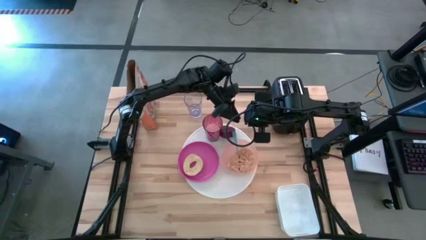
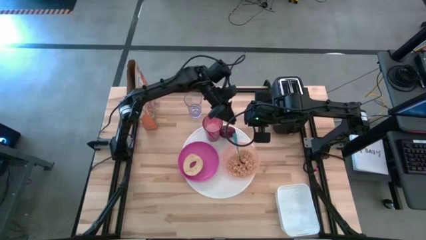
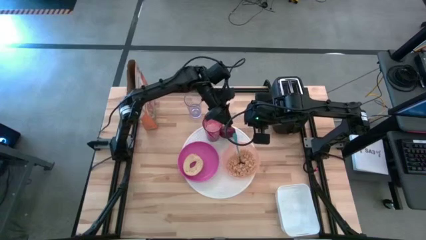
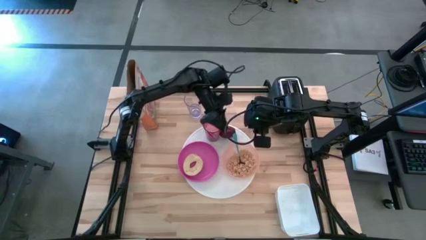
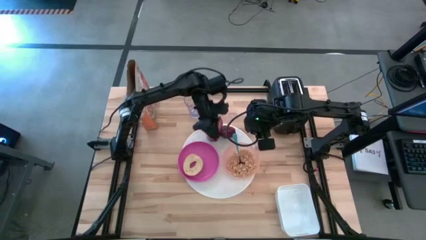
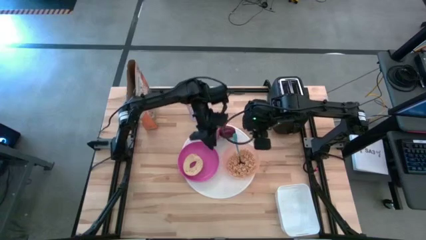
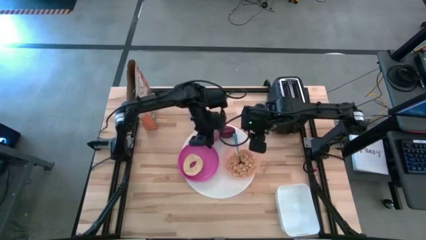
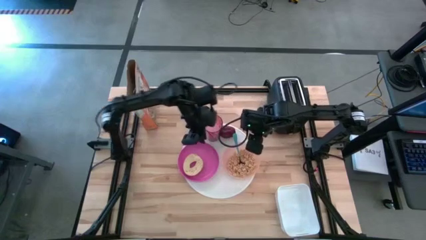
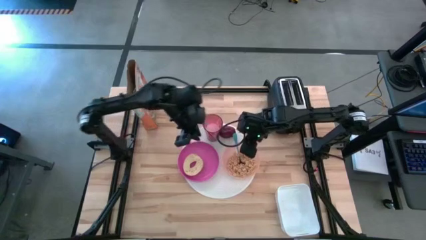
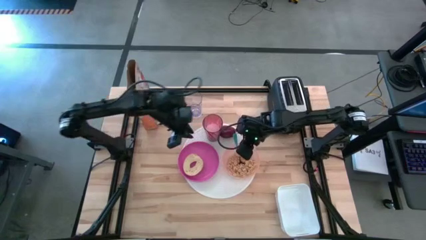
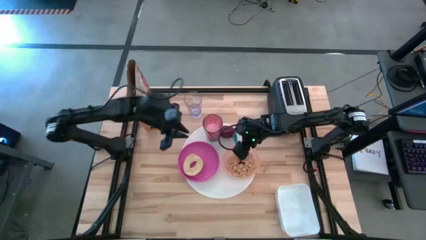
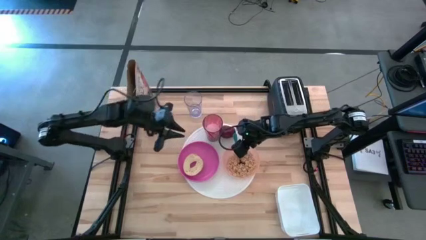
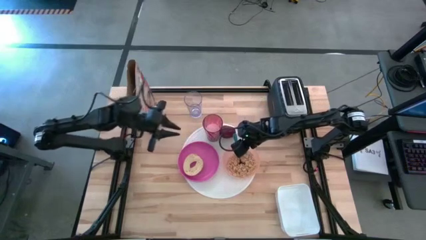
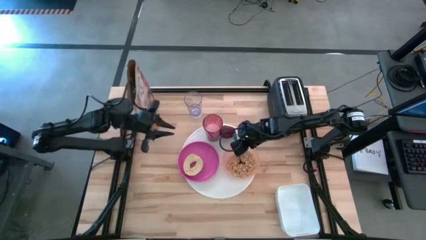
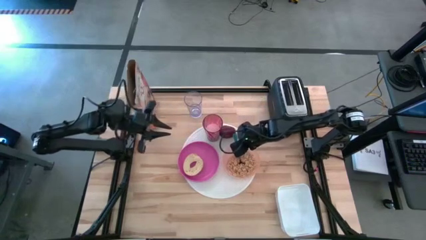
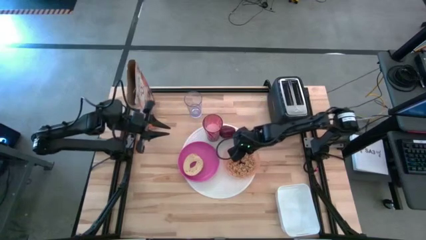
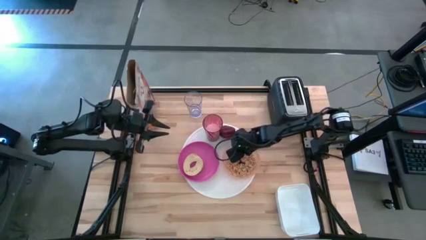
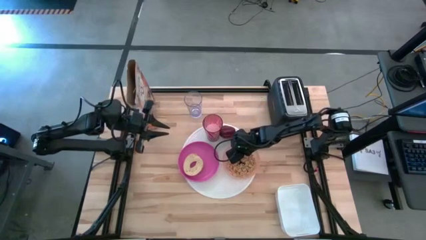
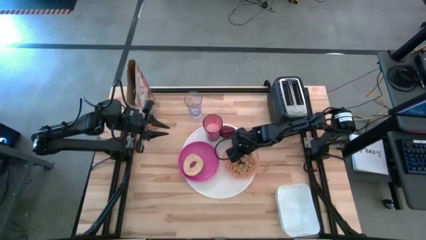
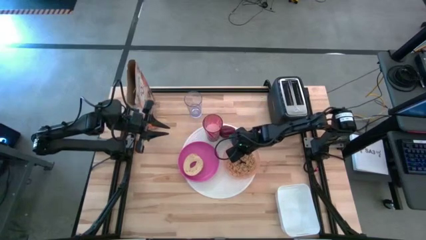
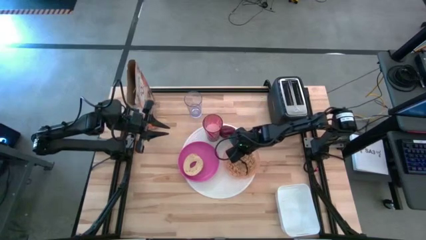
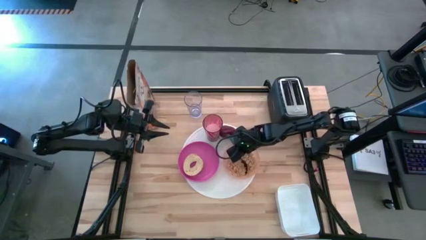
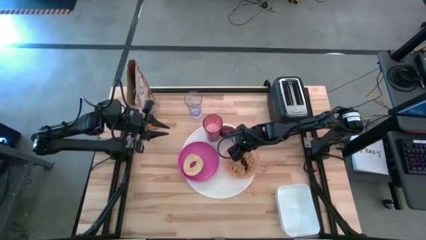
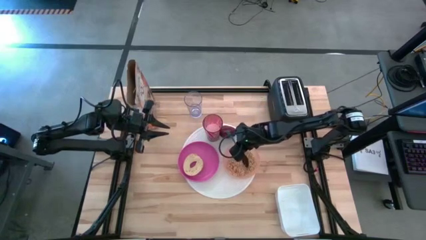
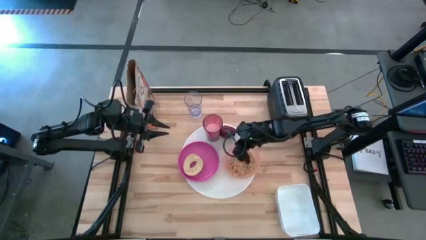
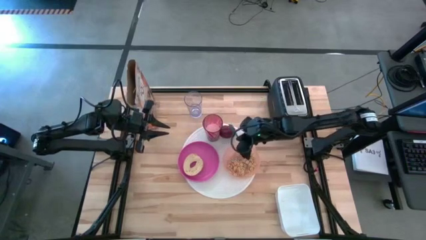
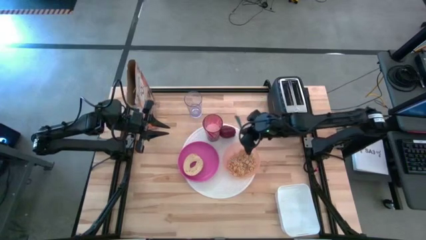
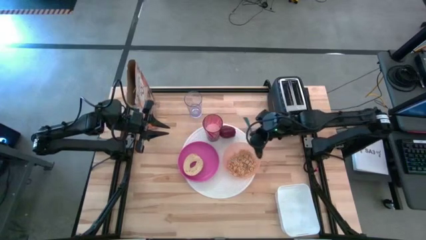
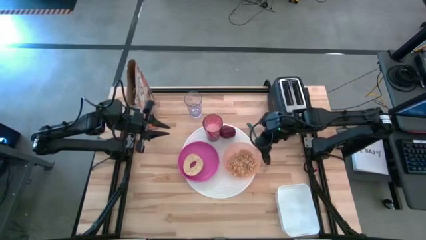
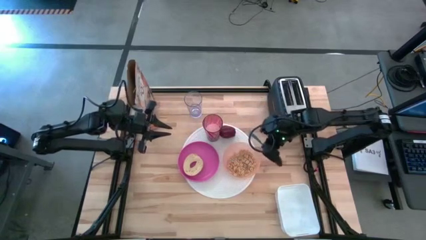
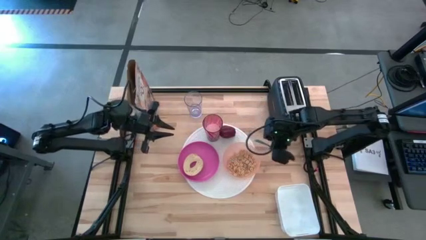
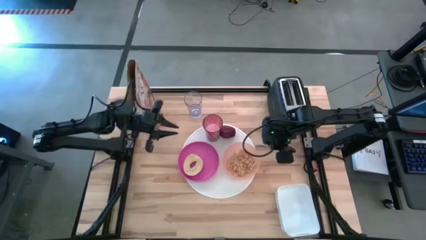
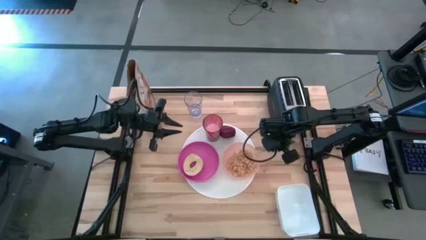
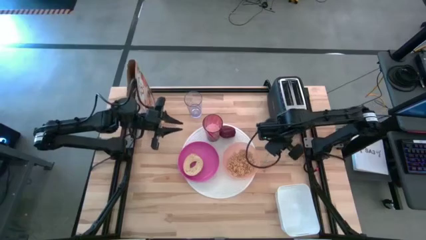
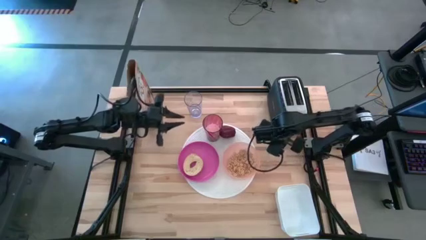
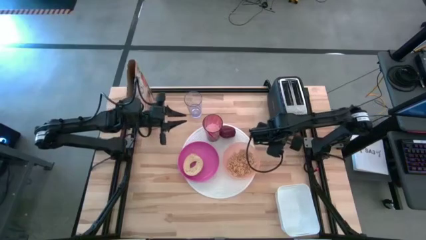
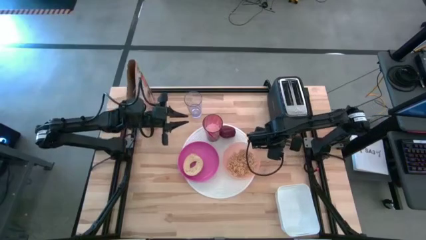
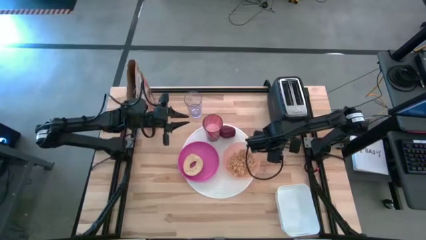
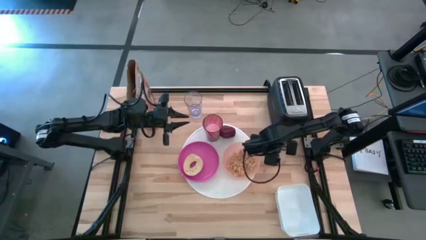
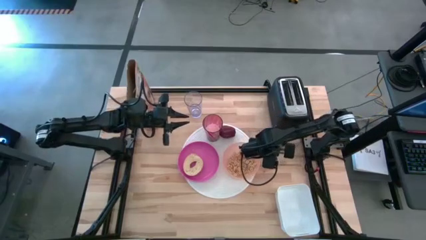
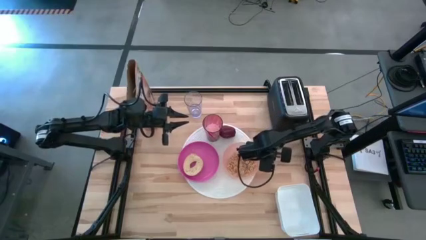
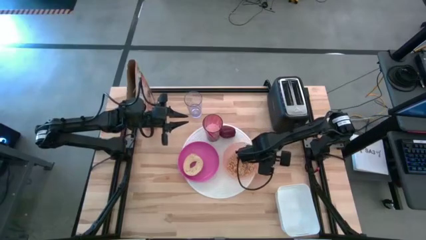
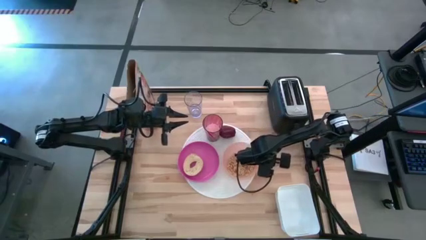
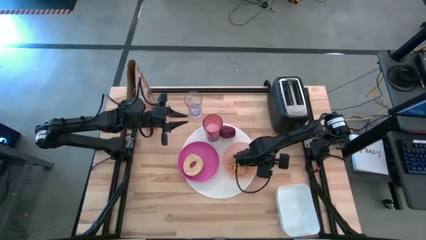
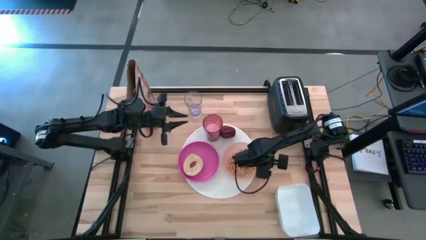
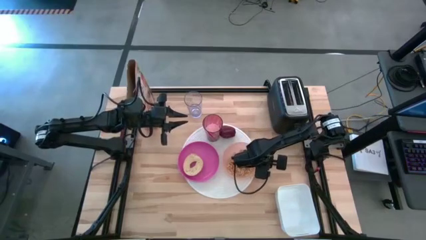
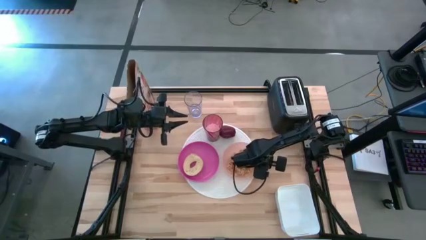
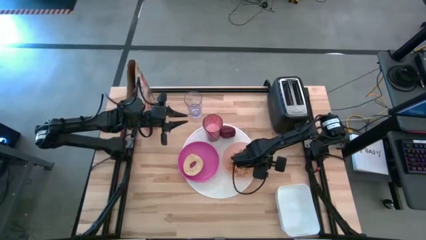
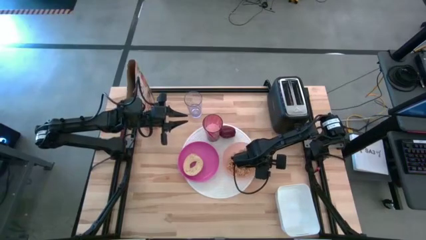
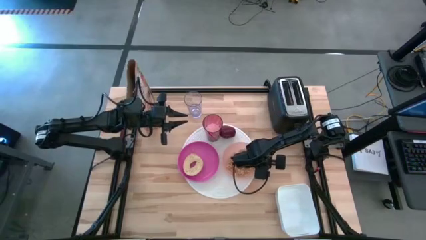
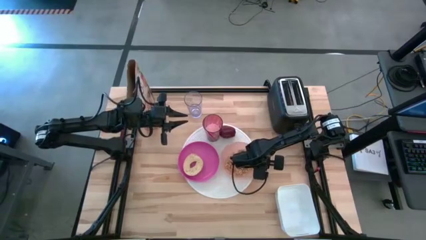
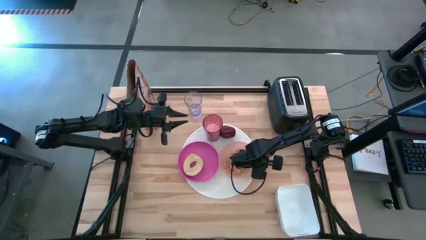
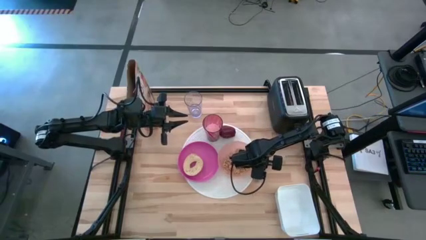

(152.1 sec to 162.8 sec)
Task: Arrange a breakfast setting
Put the blue spoon beside the orange bowl

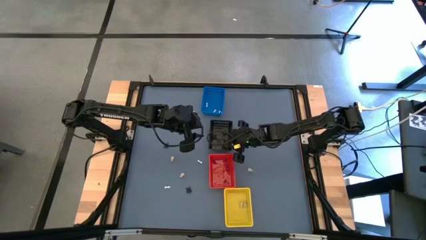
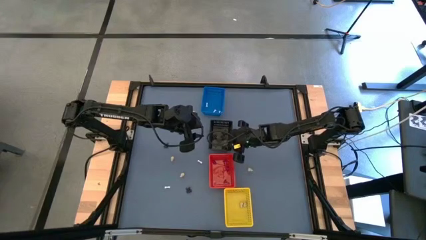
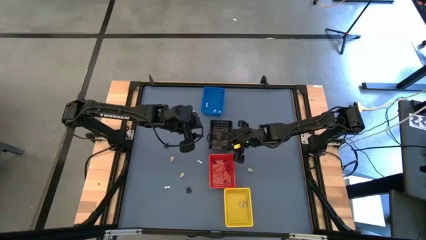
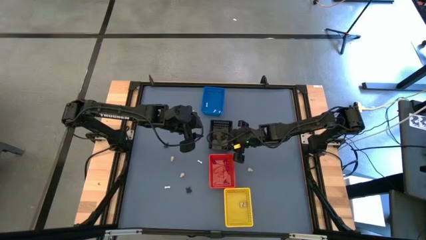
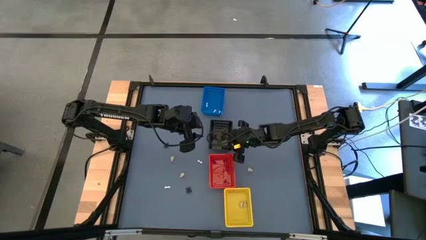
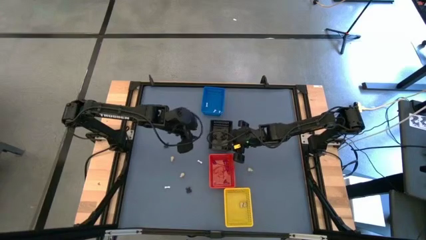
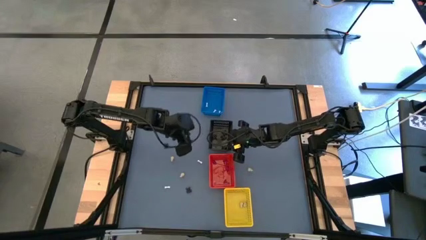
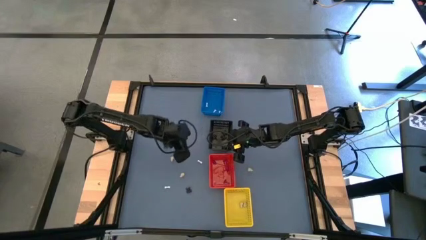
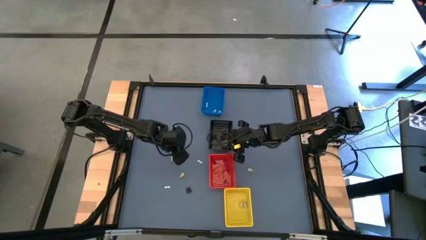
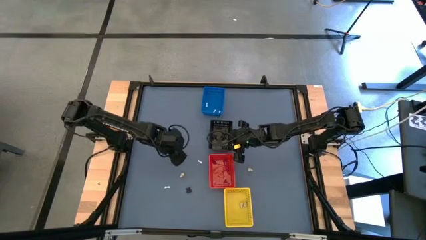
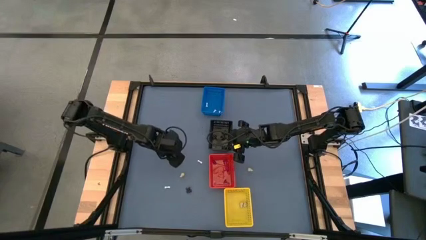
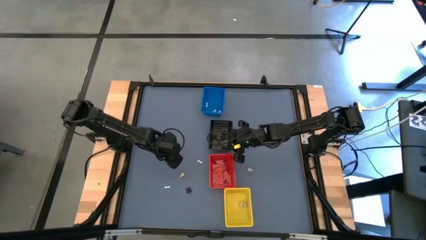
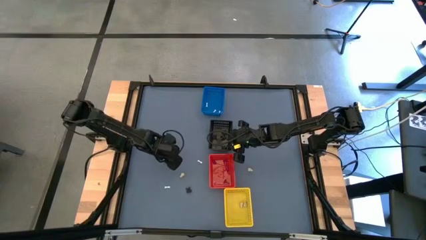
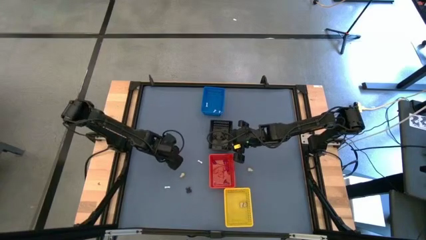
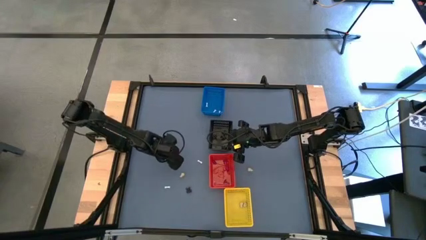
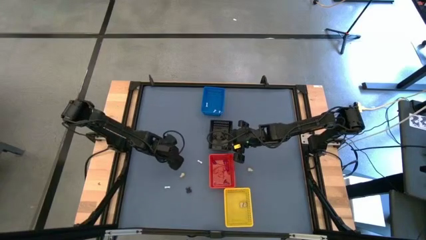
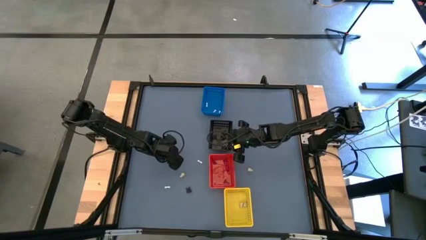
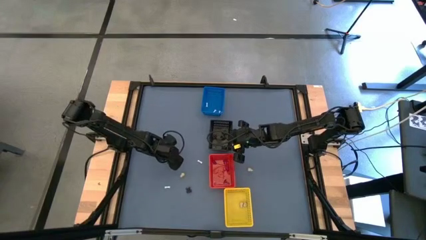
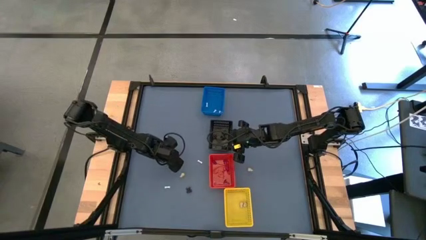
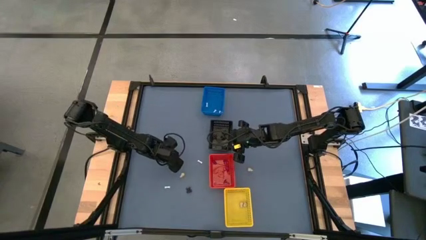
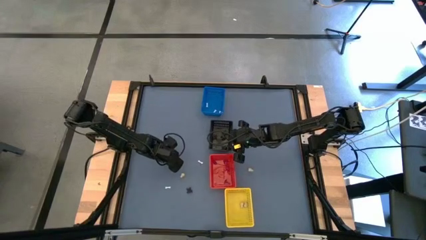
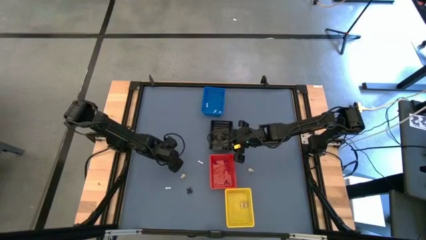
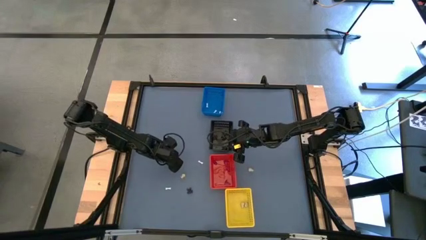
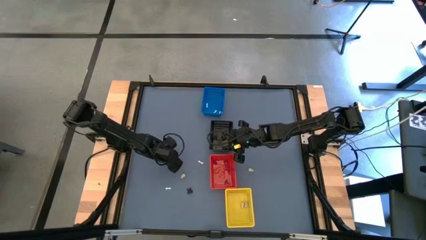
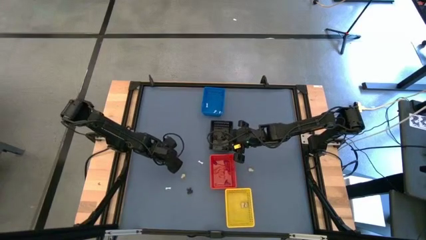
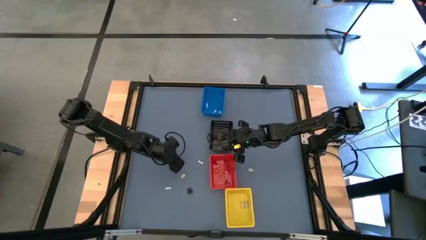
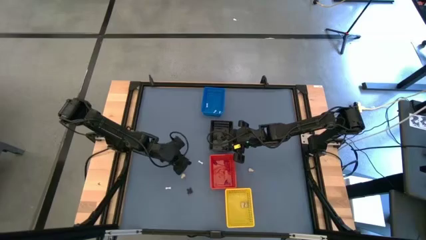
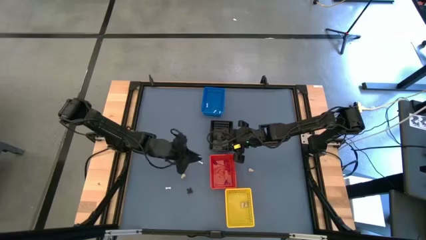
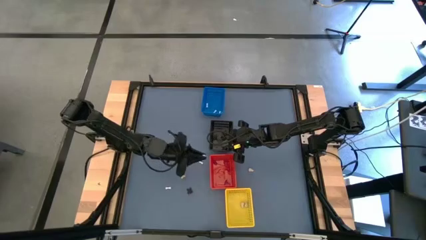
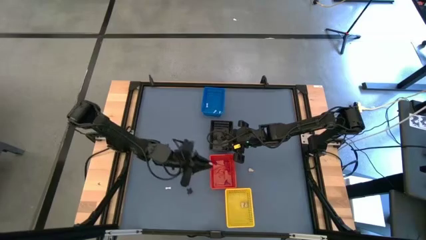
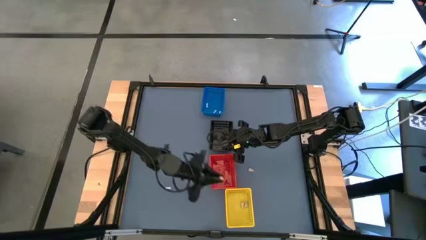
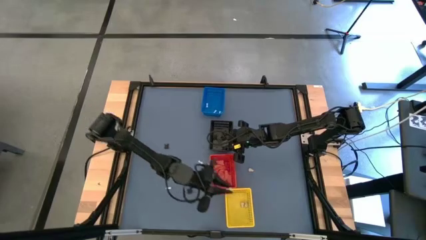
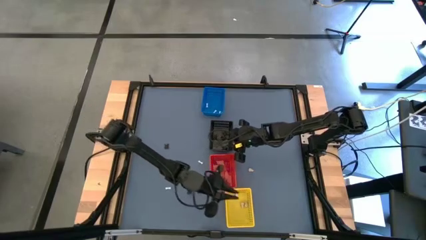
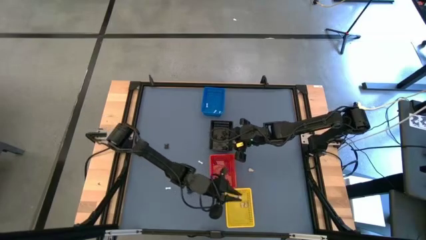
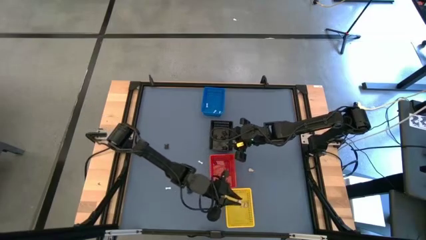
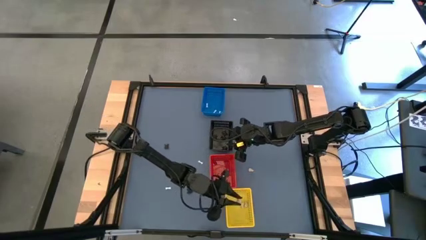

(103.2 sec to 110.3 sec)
Task: Sort Halloween decoration
Put the brown skull toy into the yellow bin
